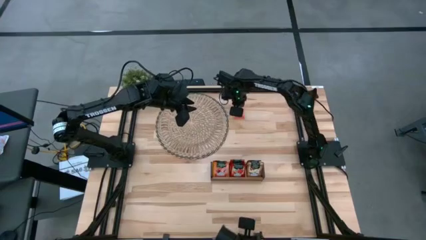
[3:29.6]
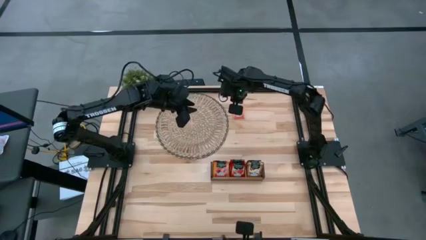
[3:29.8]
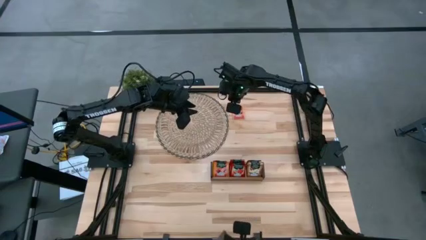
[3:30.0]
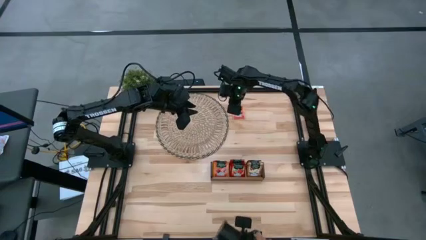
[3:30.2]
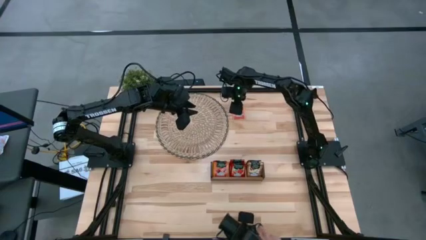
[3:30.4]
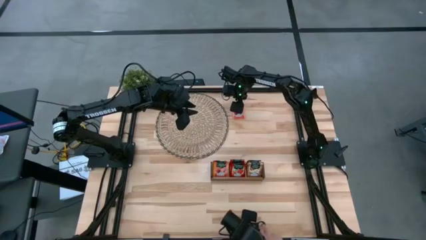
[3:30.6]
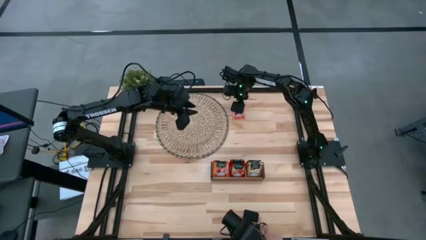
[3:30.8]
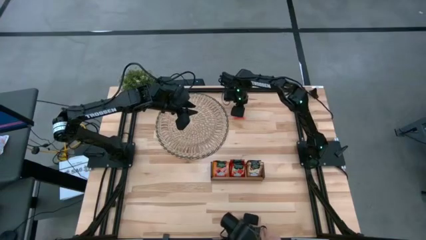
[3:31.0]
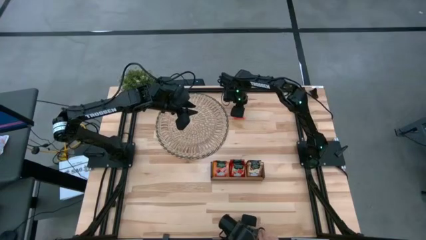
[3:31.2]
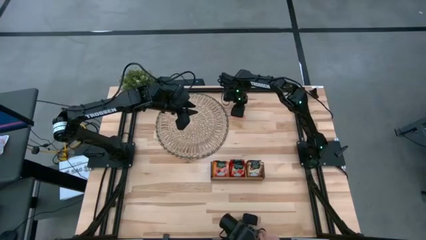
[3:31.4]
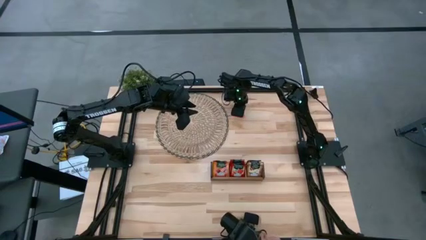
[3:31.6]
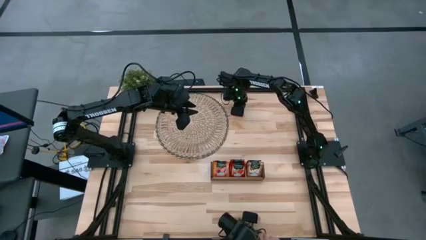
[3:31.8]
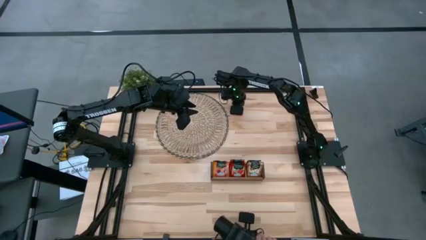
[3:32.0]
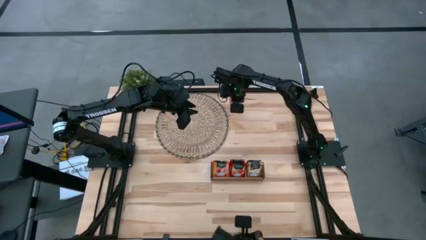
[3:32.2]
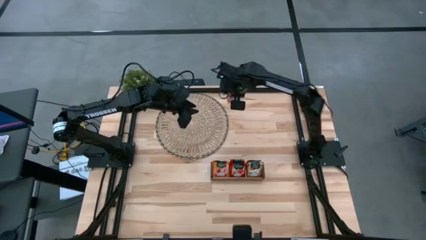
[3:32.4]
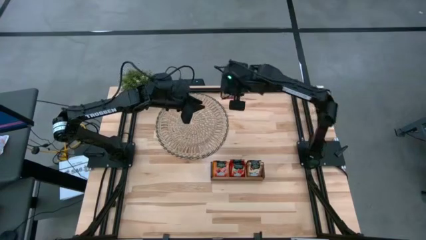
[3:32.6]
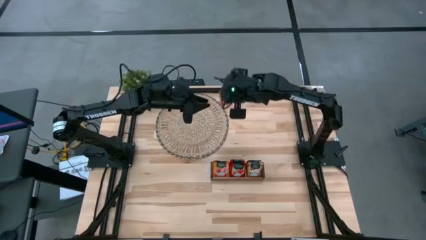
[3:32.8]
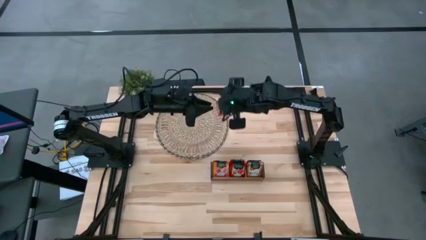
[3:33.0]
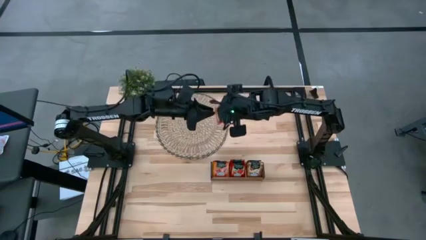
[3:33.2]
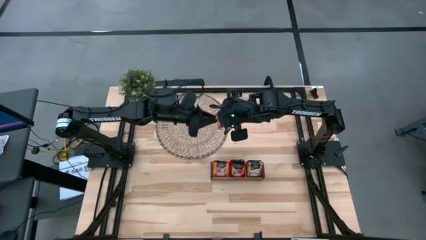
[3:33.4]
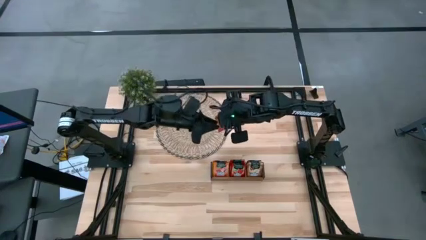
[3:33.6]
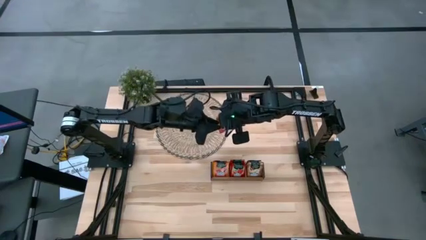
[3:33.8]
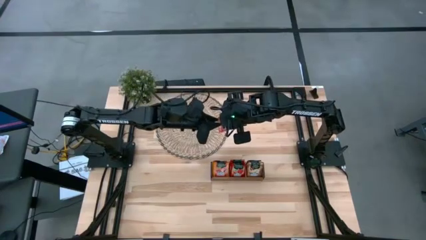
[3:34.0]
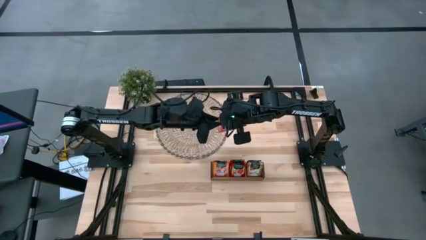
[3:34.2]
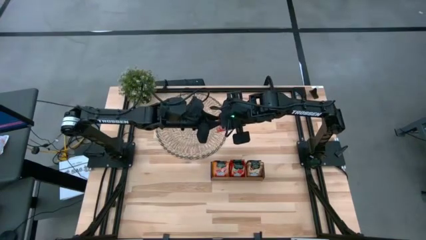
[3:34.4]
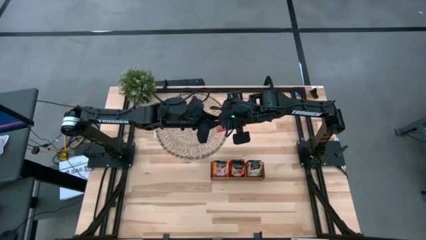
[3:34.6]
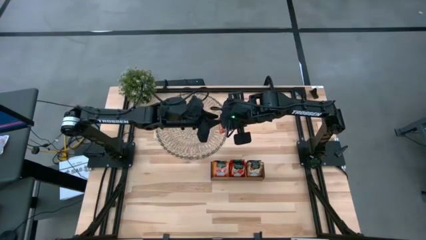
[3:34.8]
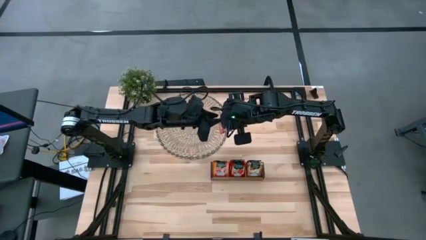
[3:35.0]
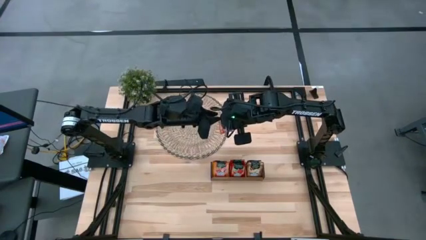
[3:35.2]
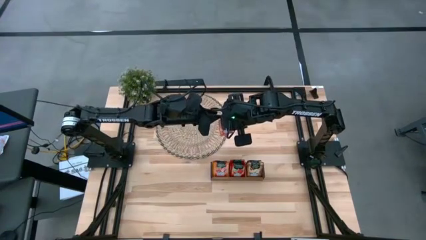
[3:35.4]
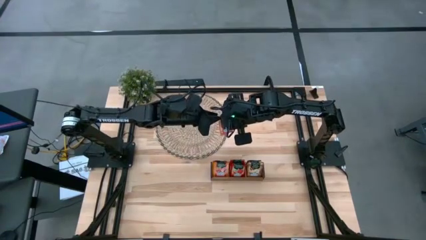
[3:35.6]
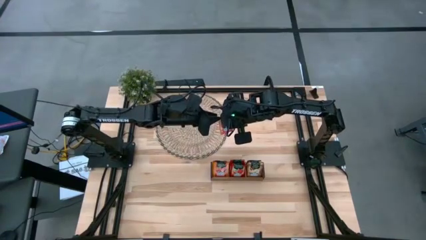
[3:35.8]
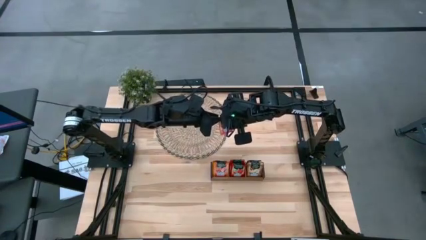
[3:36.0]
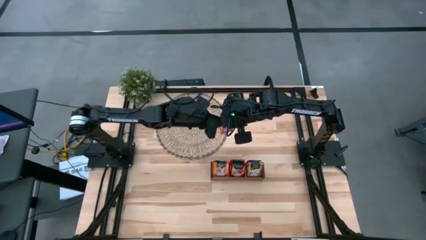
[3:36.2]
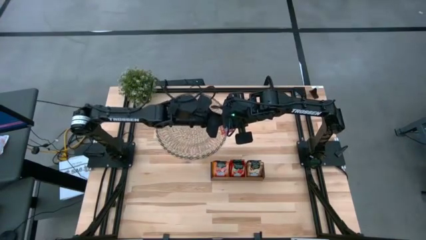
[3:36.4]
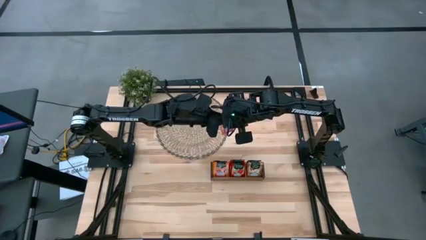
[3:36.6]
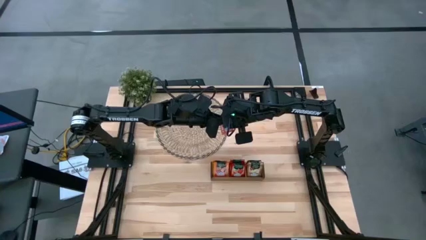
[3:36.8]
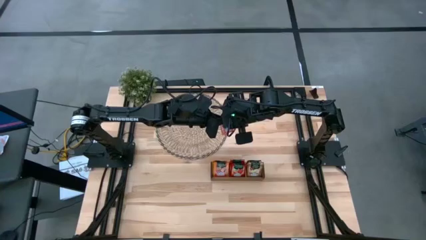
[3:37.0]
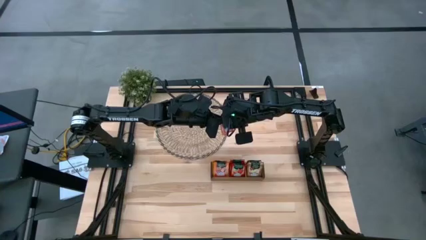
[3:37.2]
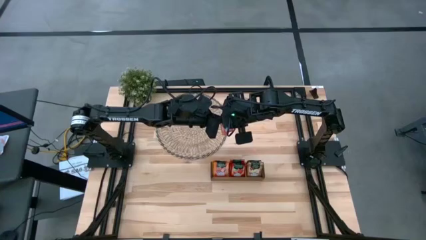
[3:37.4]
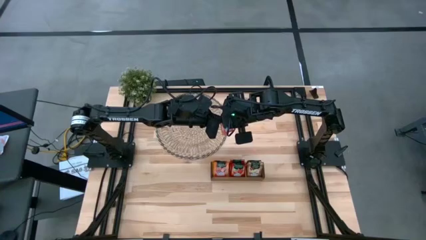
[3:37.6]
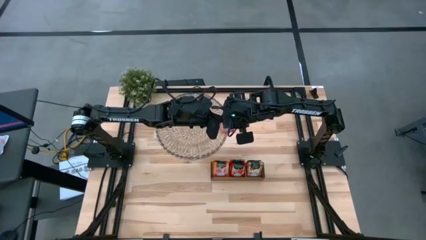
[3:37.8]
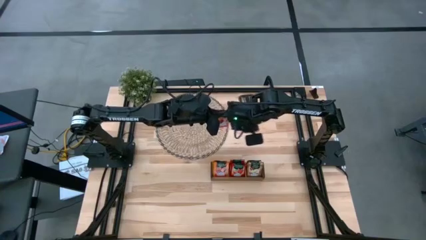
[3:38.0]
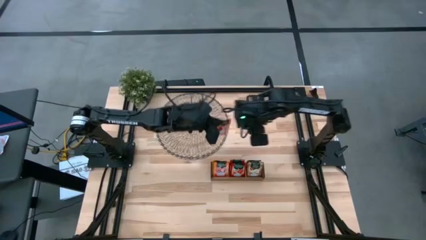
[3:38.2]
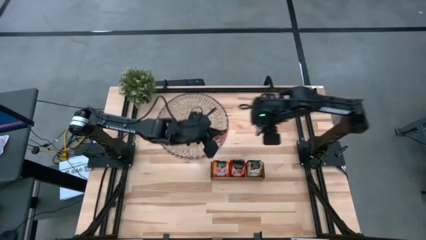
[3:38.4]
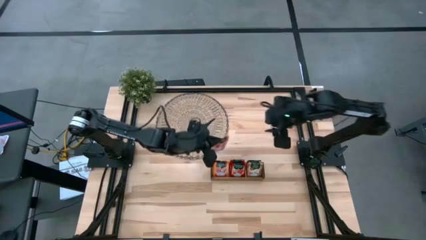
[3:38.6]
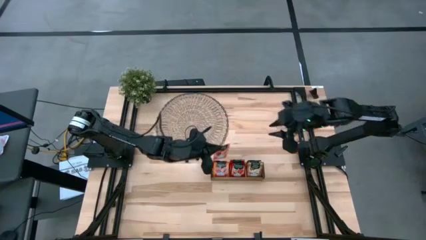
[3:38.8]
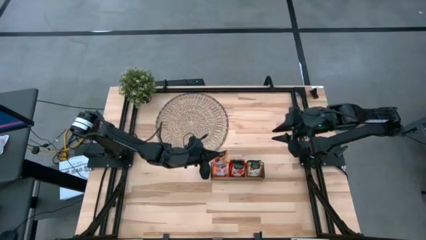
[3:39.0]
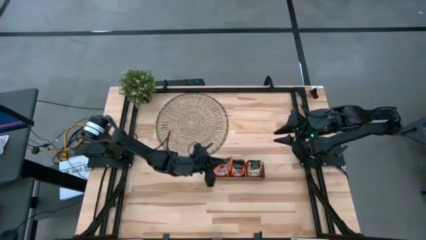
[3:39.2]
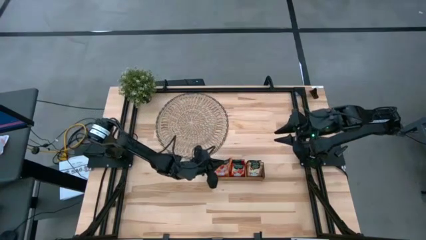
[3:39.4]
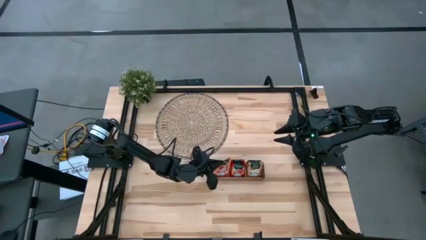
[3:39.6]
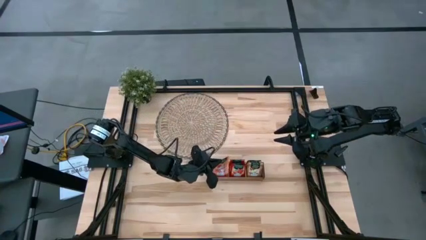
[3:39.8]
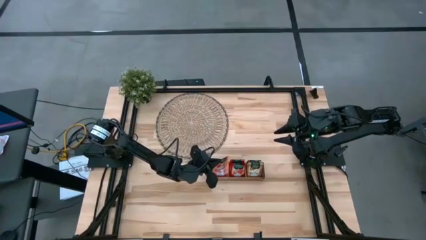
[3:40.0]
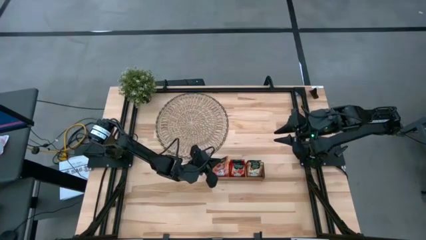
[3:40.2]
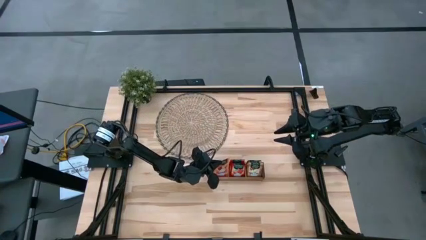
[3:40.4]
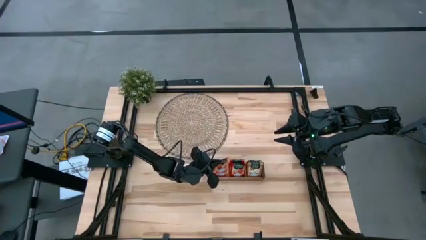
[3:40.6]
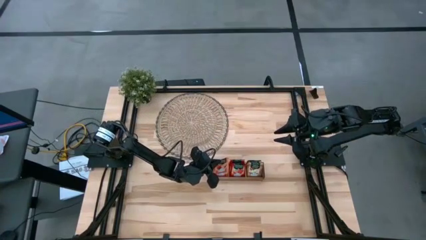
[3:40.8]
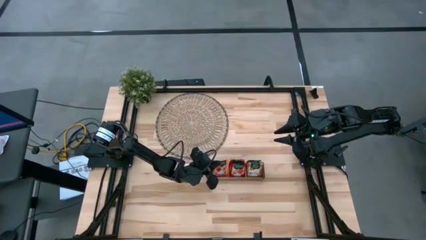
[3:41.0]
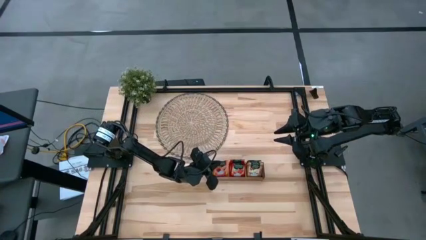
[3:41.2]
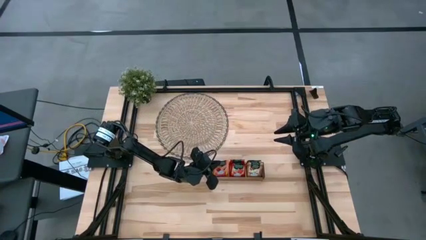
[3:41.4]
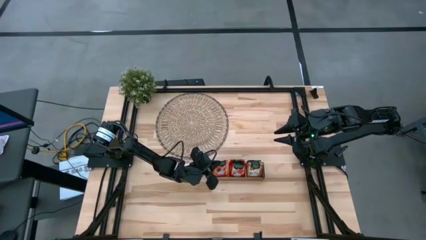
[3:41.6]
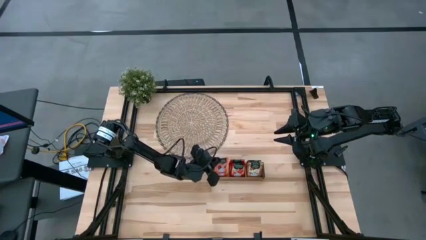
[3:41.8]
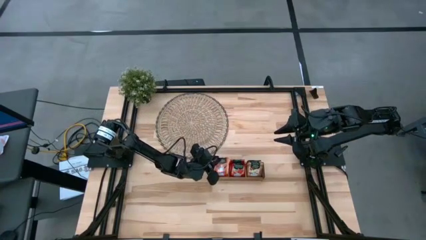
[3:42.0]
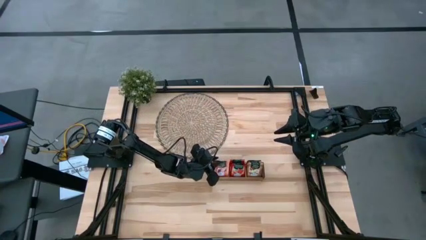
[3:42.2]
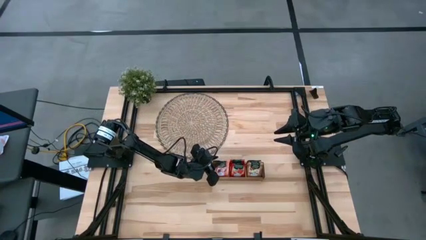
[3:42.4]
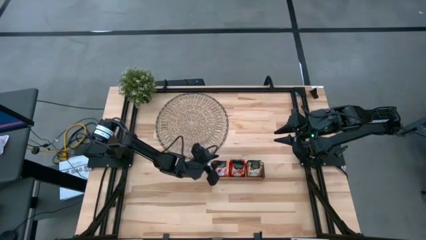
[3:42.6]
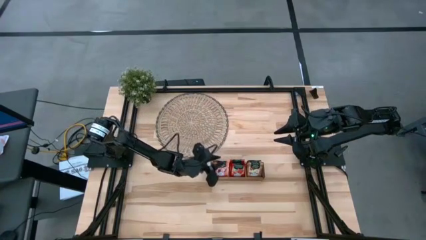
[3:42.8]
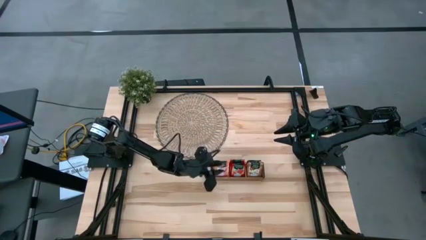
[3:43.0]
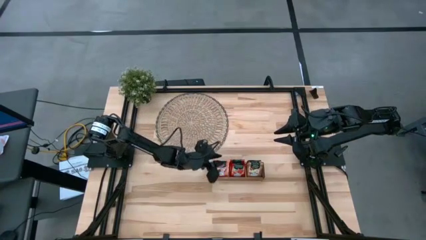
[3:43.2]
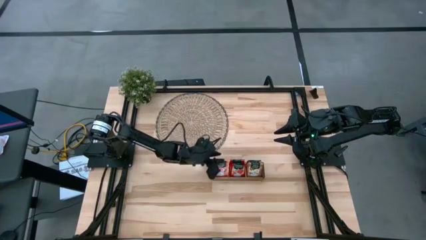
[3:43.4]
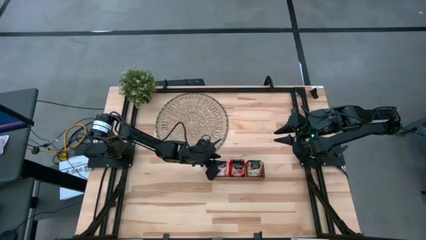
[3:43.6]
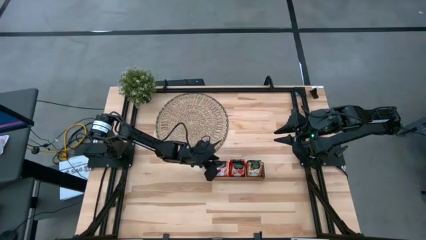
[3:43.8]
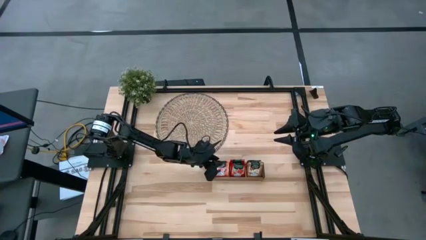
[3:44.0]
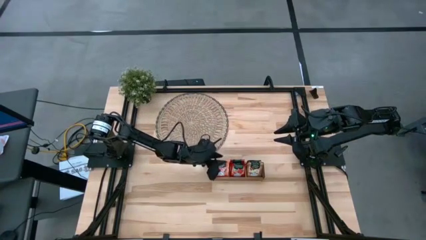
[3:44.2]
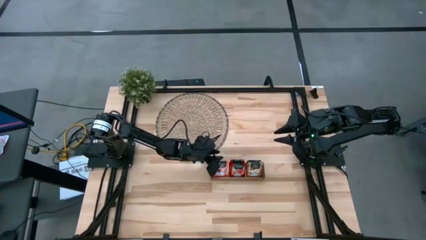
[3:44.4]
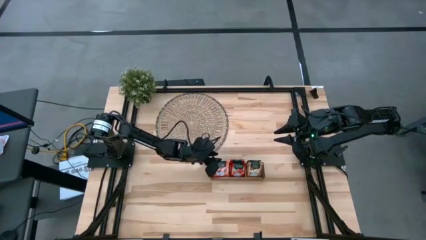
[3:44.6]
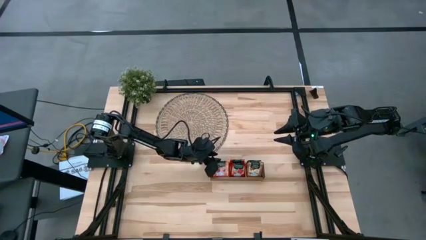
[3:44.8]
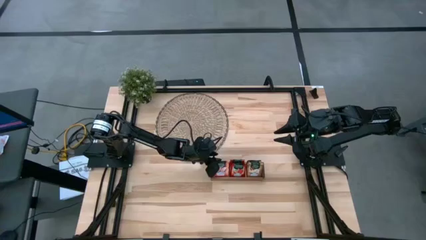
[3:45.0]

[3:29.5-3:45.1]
Task: Pick & Place Tea
Put the orange tea bag into the left slot of the wooden organizer
